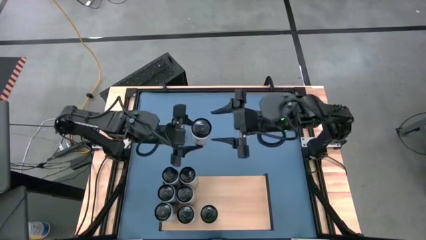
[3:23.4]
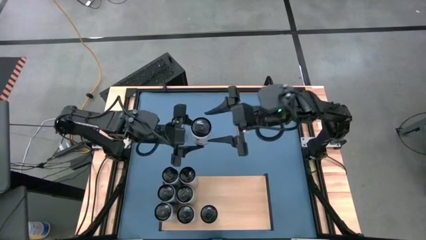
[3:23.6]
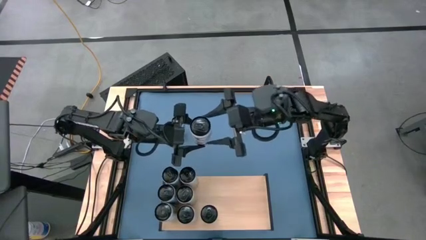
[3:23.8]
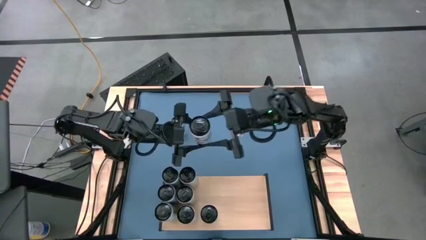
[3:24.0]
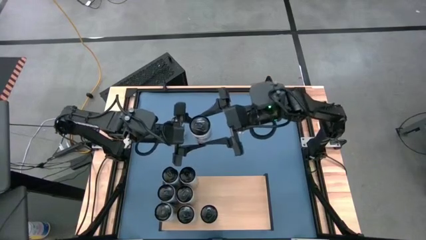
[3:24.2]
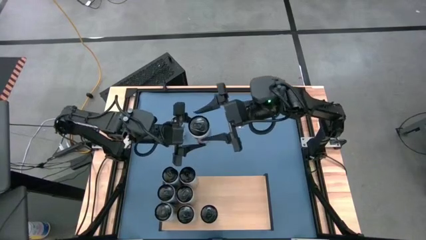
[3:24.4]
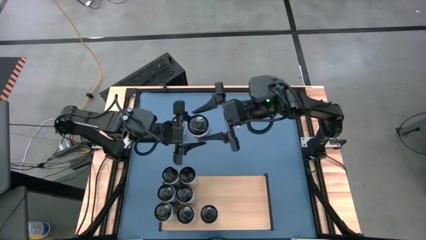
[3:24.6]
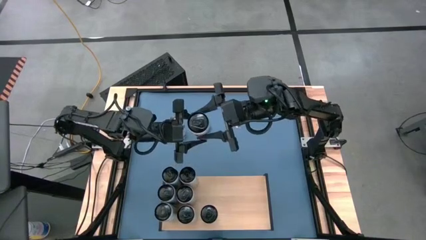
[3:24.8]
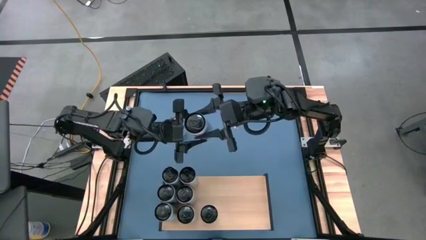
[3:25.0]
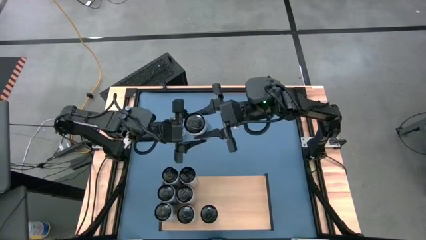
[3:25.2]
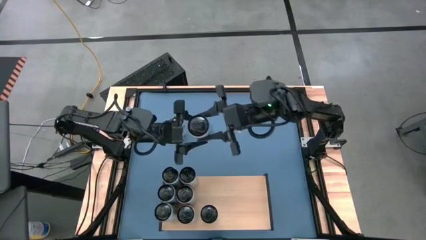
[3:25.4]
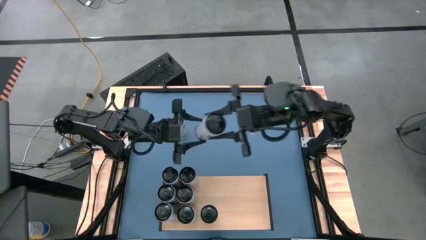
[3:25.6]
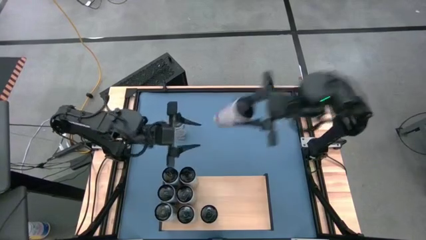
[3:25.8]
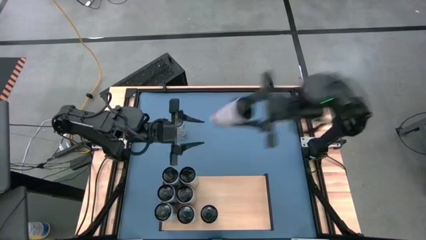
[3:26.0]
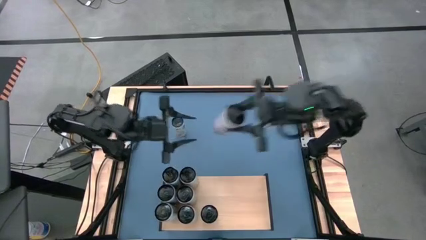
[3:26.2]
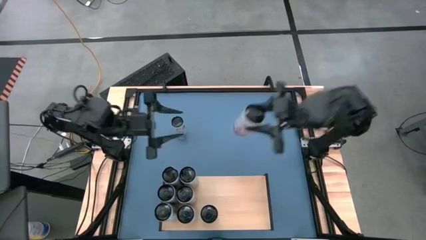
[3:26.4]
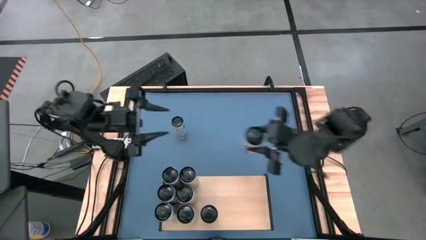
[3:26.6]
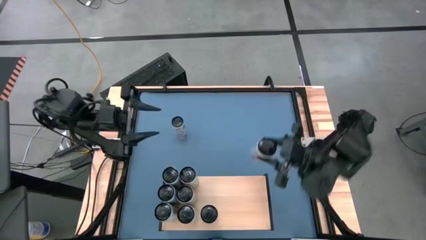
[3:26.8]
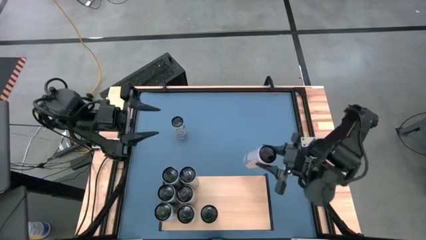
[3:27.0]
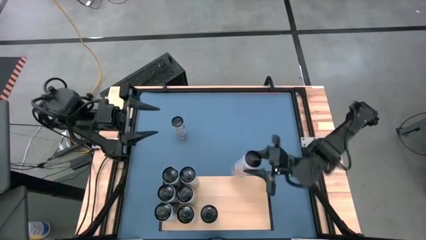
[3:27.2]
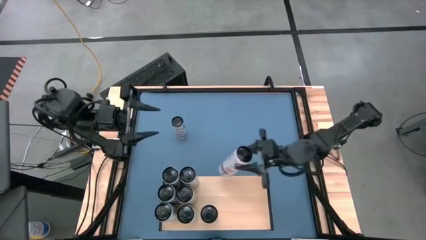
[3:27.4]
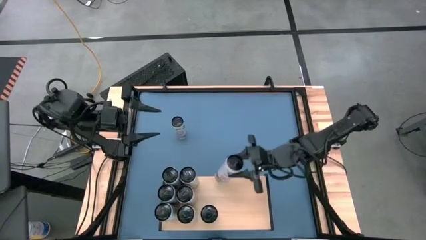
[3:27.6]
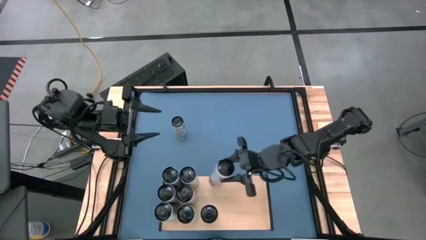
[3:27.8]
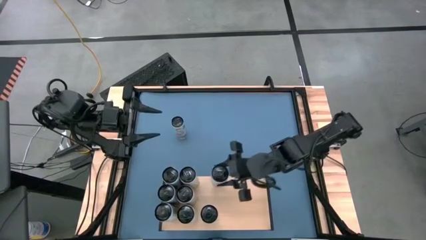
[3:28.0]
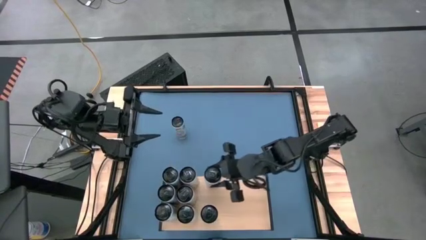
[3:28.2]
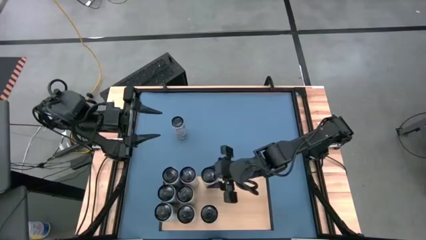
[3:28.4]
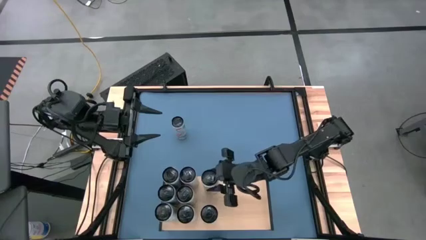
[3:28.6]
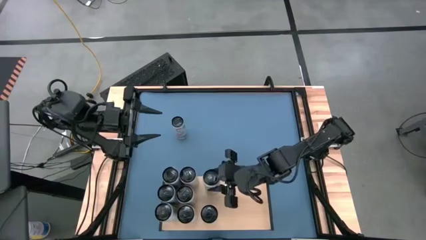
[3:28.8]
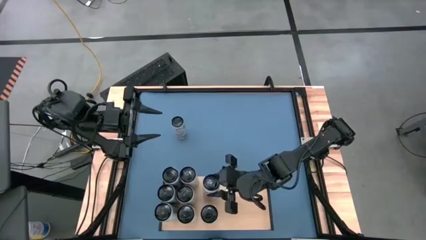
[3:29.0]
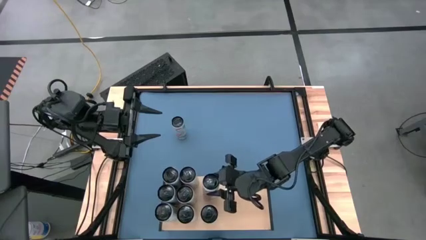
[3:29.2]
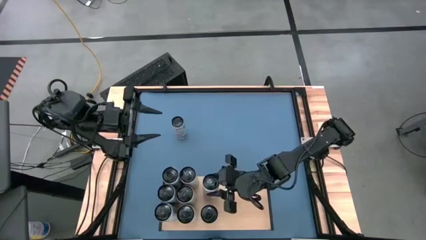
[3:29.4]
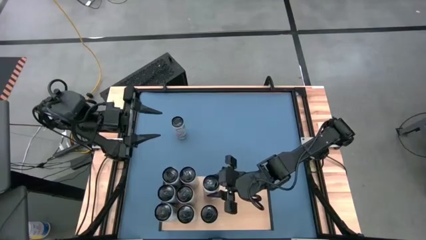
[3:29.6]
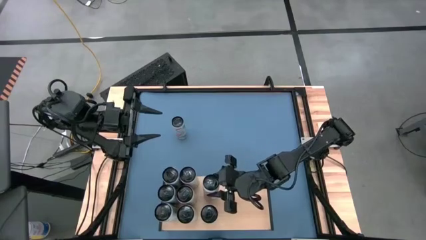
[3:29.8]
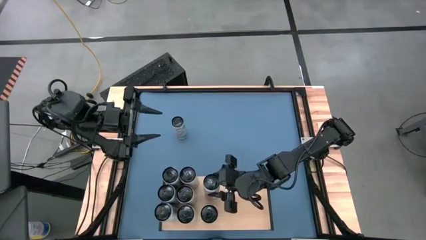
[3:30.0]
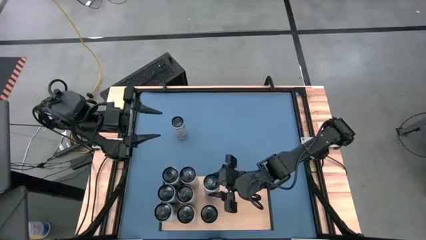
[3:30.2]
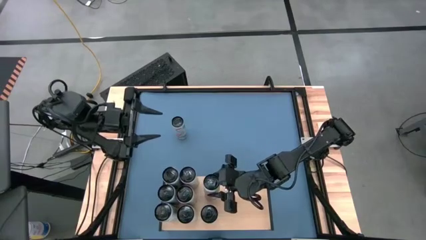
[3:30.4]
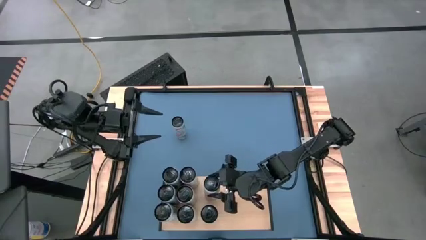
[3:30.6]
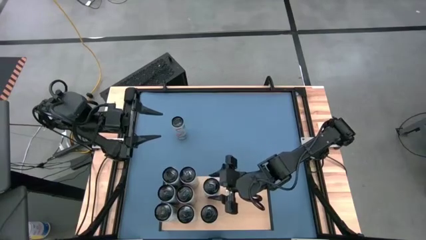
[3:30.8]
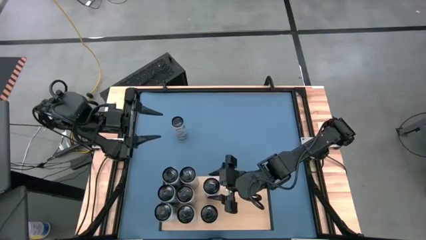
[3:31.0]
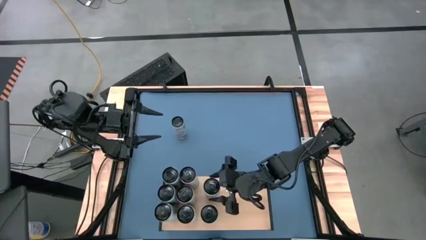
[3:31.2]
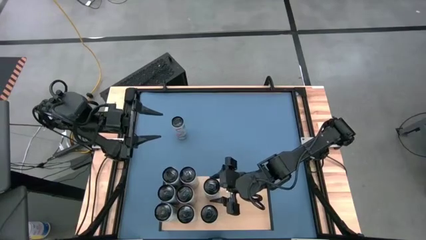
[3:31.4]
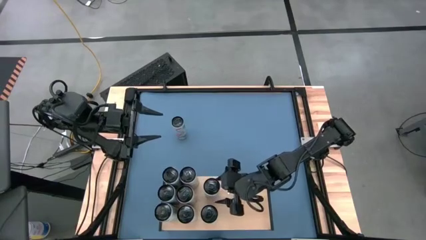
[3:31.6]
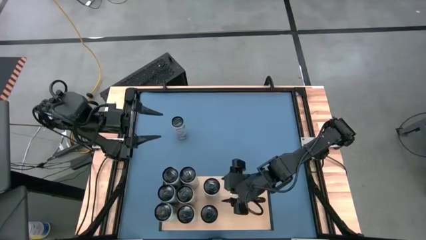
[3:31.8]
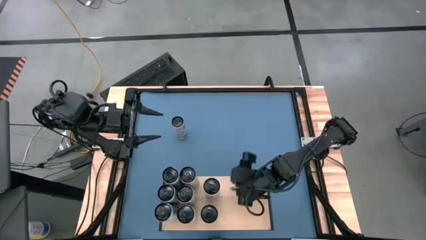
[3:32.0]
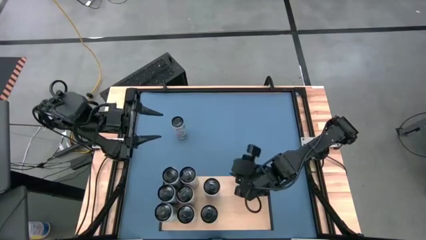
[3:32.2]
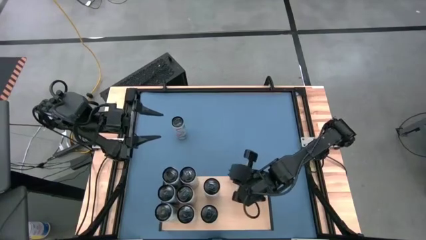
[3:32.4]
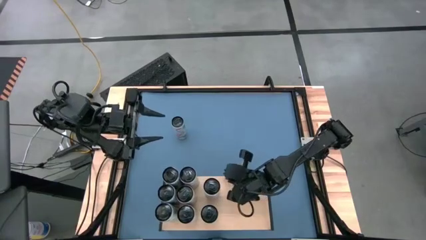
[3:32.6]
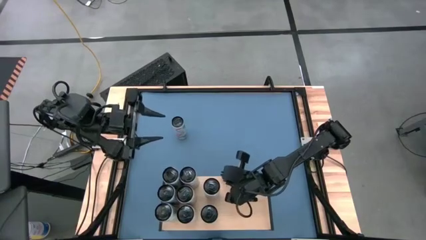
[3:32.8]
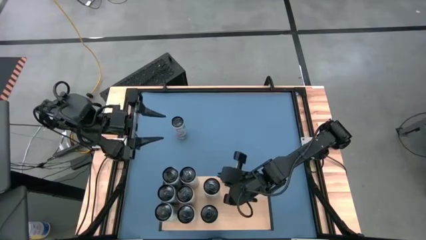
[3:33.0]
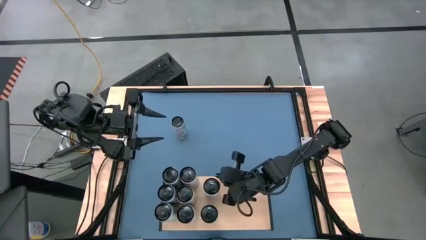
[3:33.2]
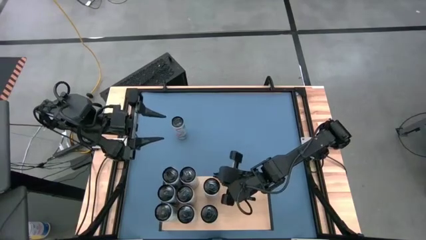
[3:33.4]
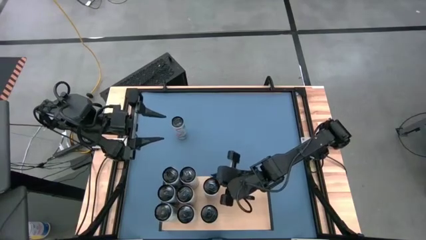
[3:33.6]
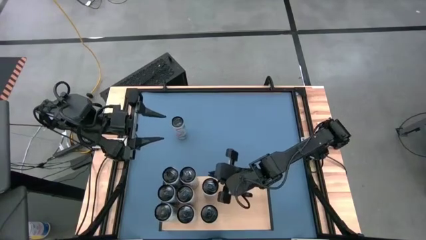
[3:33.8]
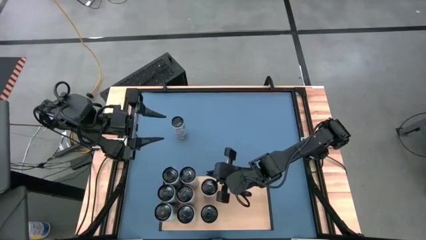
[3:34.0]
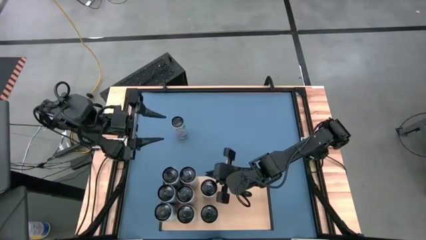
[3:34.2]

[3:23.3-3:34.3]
Task: Place canned beverage on shelf
Put the right white pink soda can on the shelf aligned with the other white pink soda can

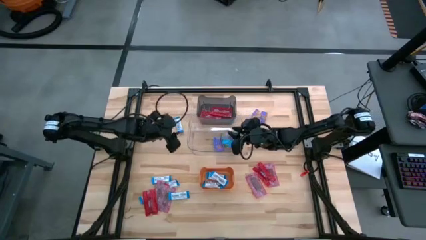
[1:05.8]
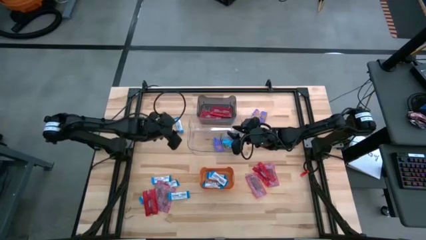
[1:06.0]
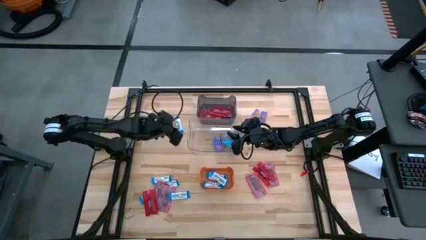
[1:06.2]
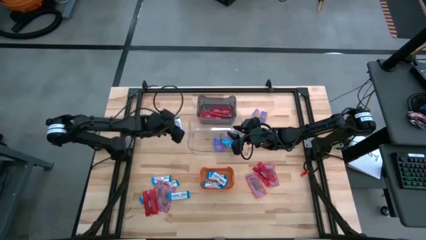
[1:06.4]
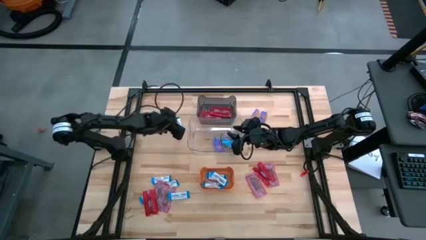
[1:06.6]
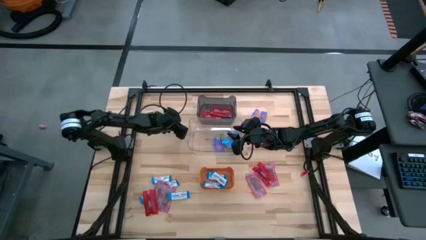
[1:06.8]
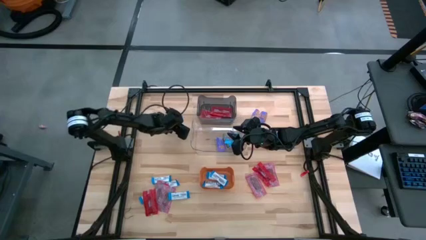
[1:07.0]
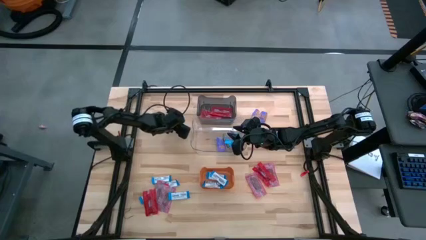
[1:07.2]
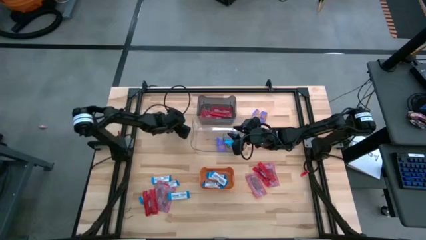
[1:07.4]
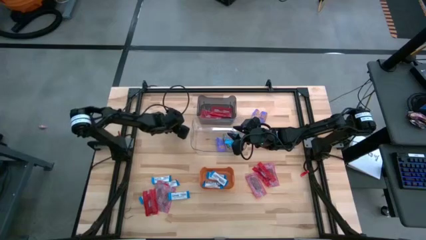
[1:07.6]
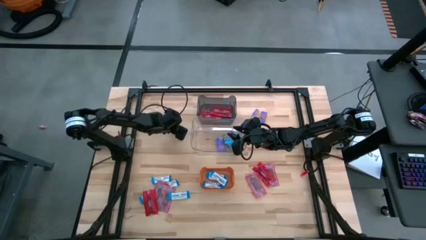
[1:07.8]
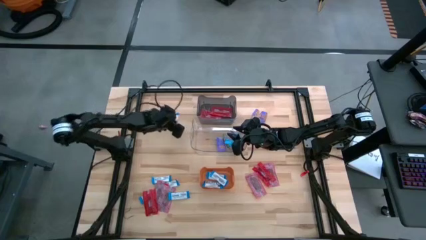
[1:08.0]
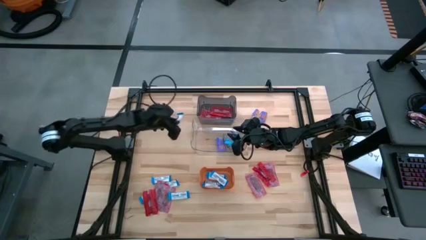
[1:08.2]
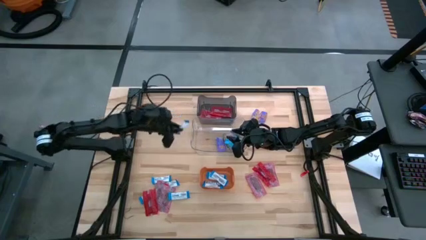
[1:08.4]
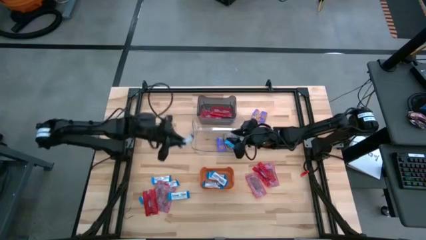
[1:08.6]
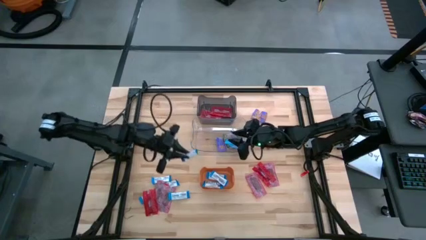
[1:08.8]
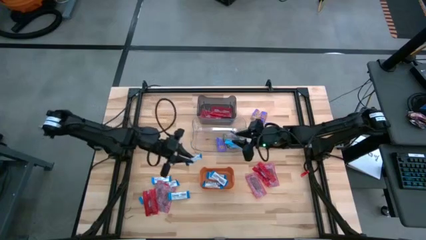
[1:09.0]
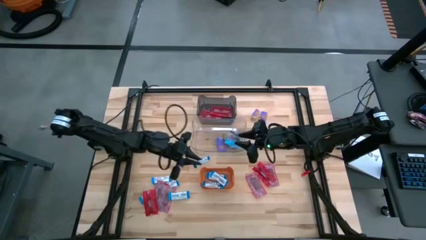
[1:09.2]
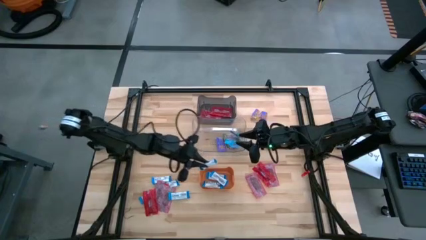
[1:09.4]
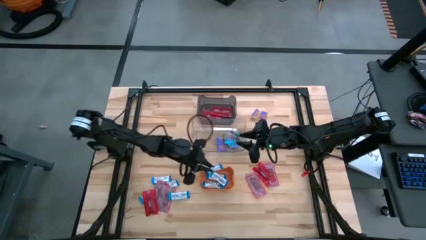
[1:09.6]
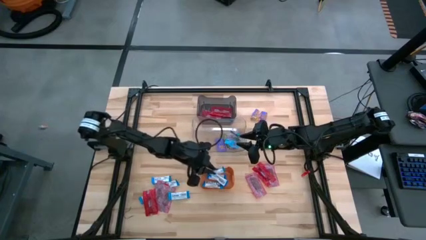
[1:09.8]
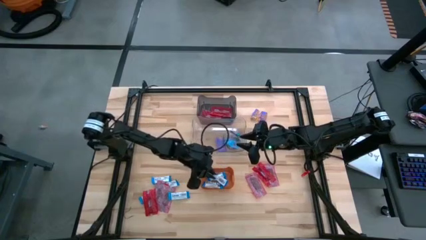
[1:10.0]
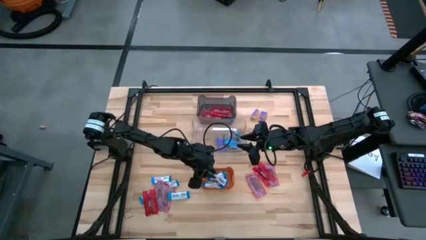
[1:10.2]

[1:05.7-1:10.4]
Task: Sort candy
Put the white chocolate bar into the orange bin

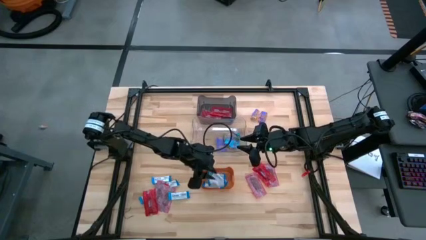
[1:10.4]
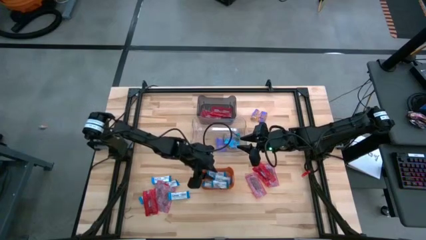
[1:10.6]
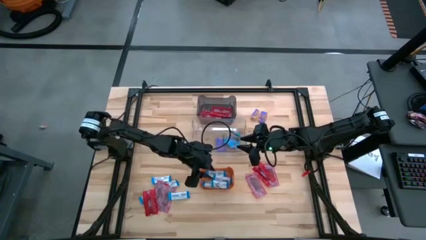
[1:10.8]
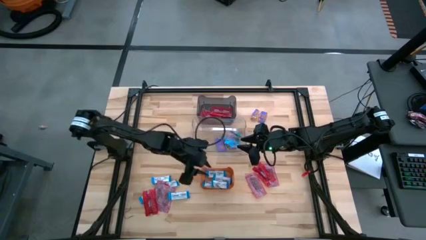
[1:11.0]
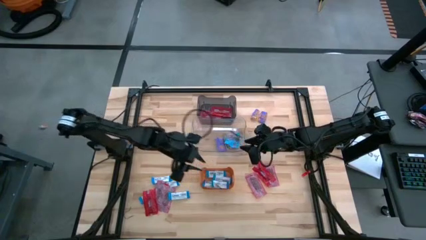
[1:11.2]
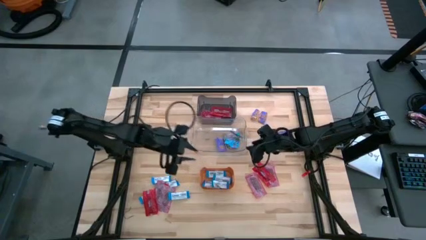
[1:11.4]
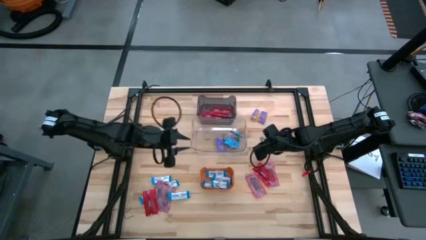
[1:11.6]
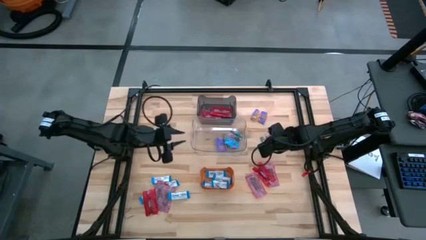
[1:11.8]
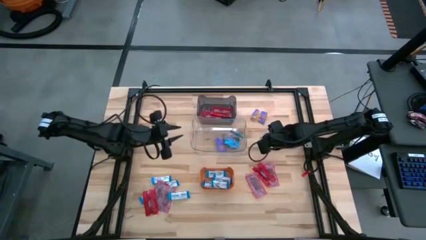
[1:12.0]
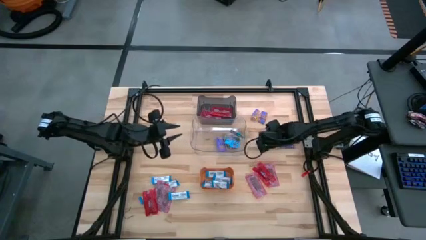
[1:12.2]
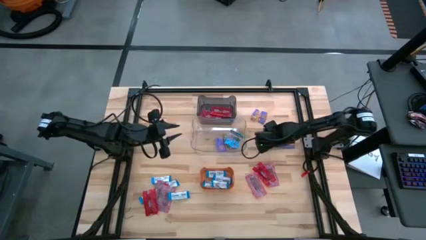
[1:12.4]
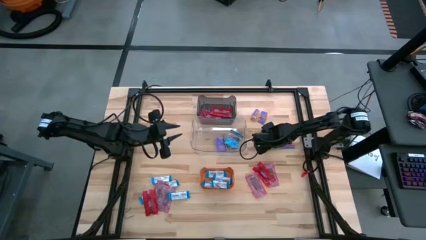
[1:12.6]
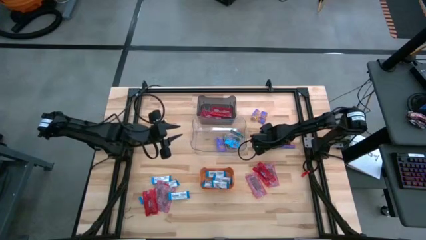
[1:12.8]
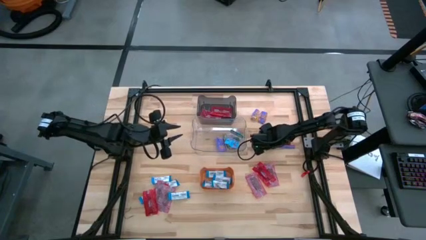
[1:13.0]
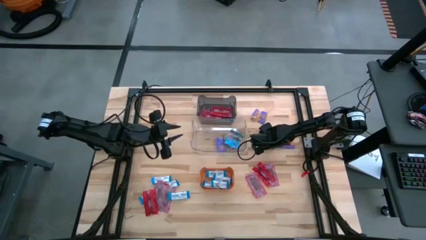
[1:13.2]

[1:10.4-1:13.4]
Put the blue candy into the clear transparent bin
